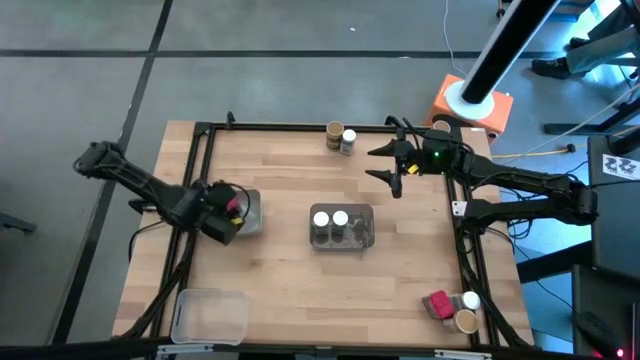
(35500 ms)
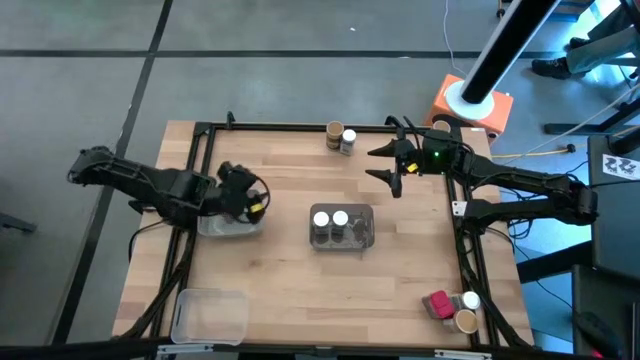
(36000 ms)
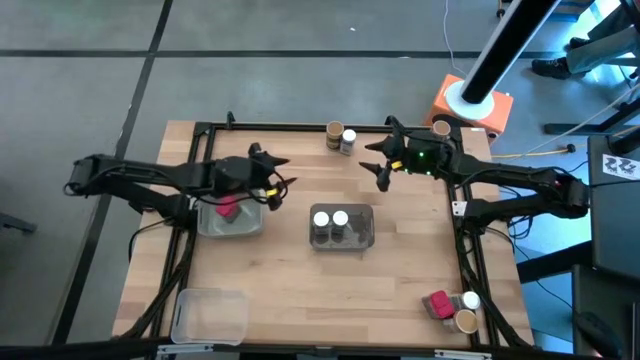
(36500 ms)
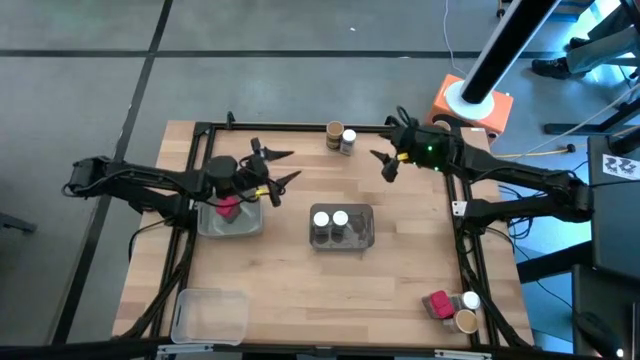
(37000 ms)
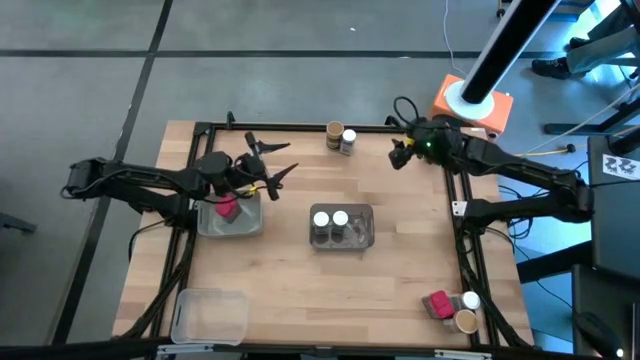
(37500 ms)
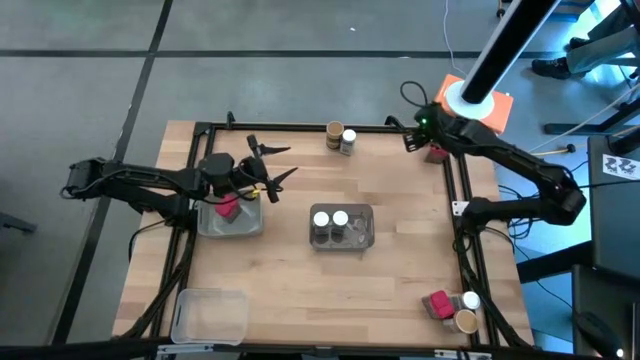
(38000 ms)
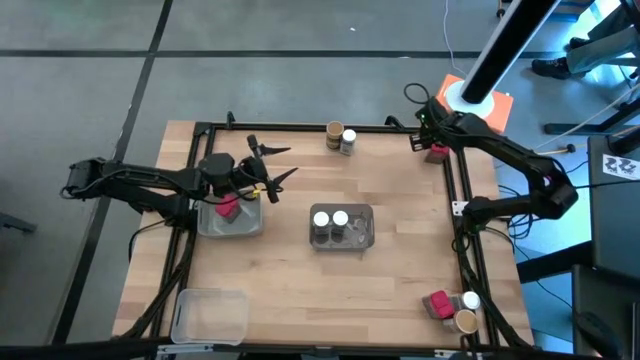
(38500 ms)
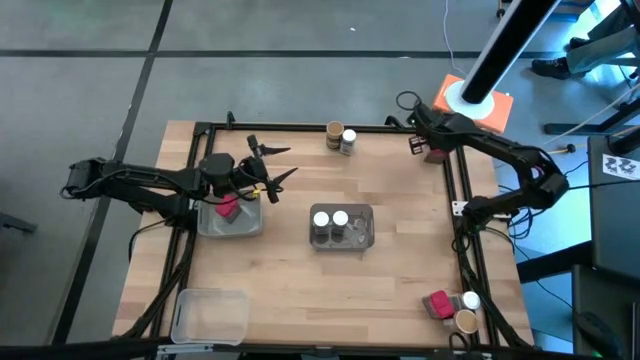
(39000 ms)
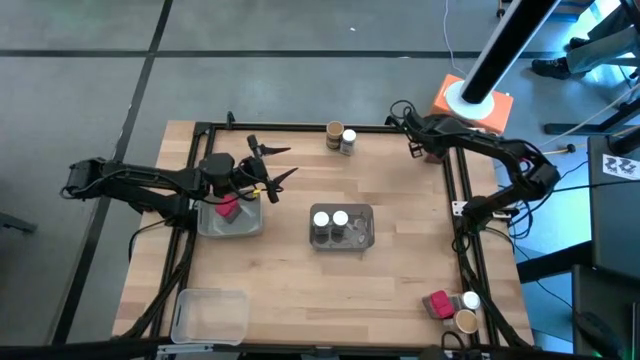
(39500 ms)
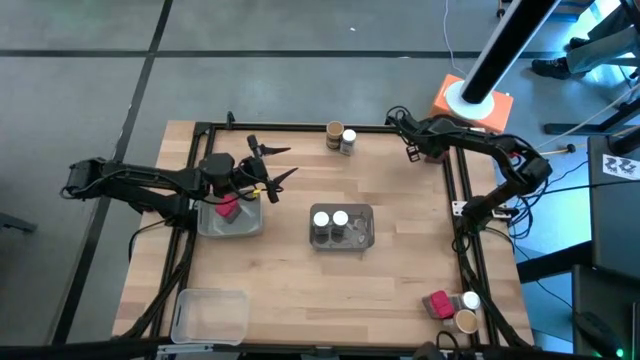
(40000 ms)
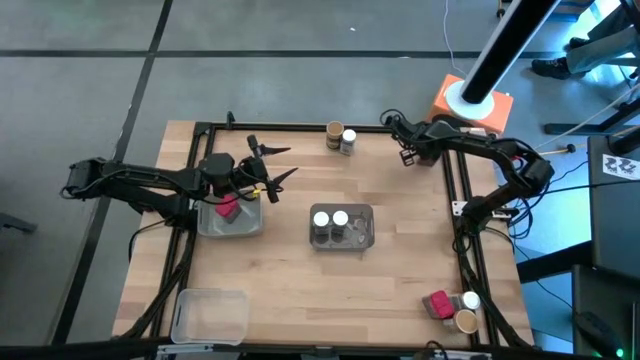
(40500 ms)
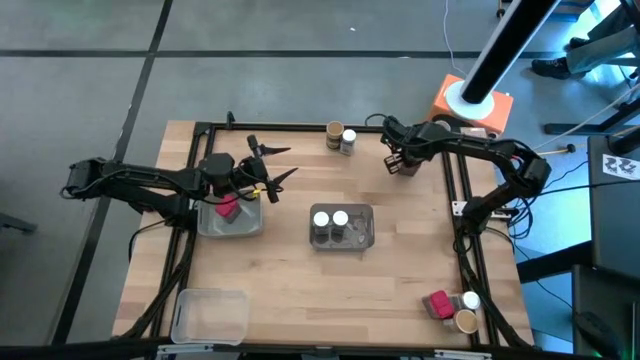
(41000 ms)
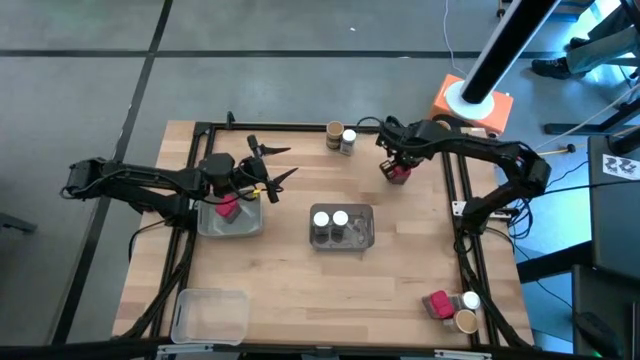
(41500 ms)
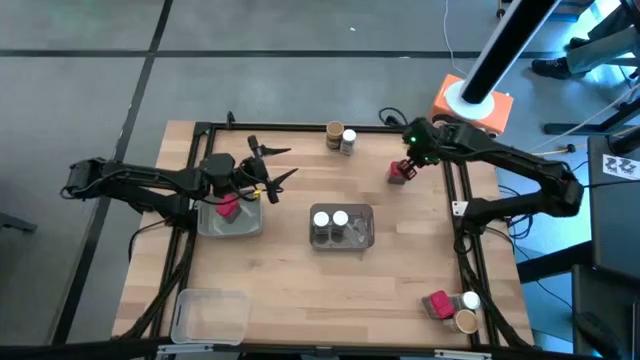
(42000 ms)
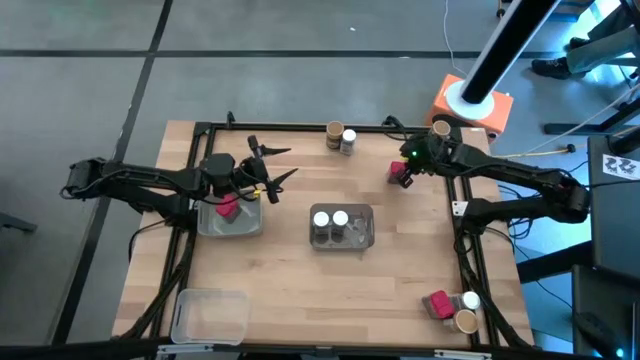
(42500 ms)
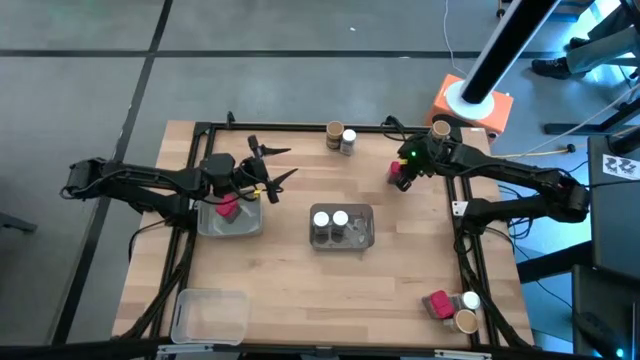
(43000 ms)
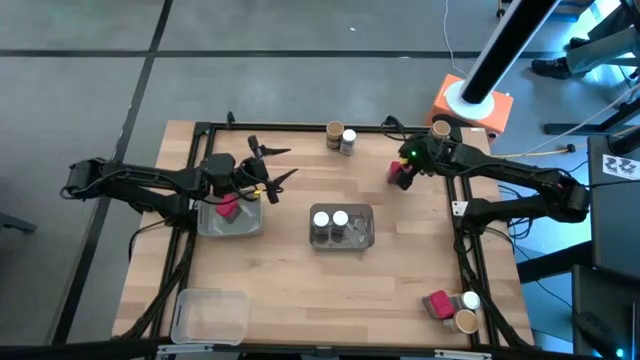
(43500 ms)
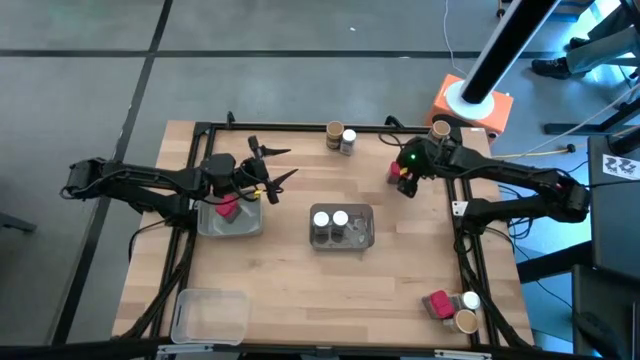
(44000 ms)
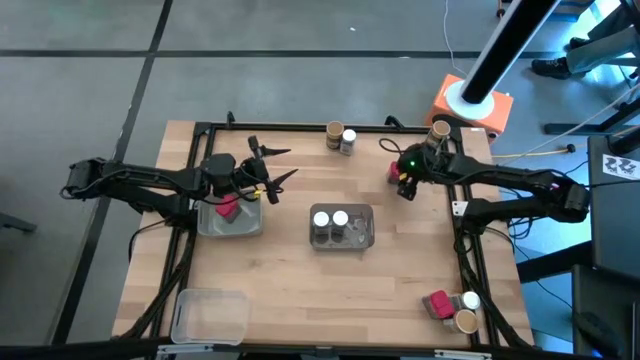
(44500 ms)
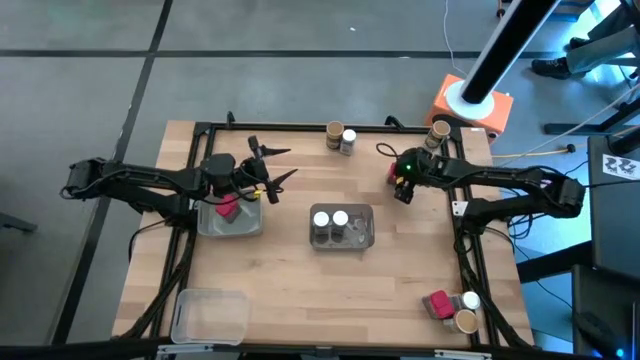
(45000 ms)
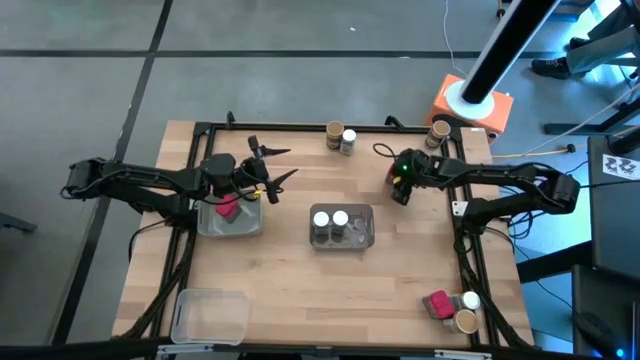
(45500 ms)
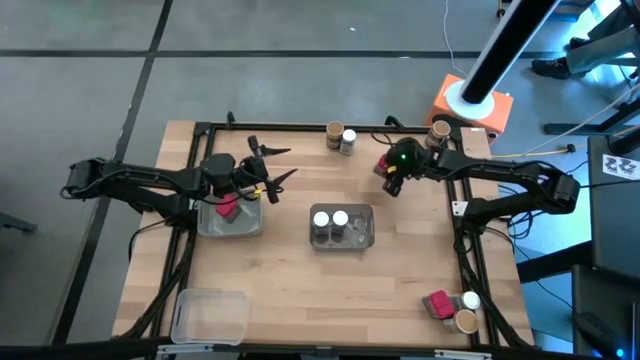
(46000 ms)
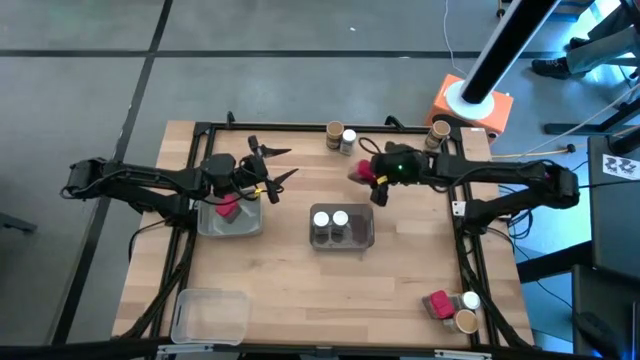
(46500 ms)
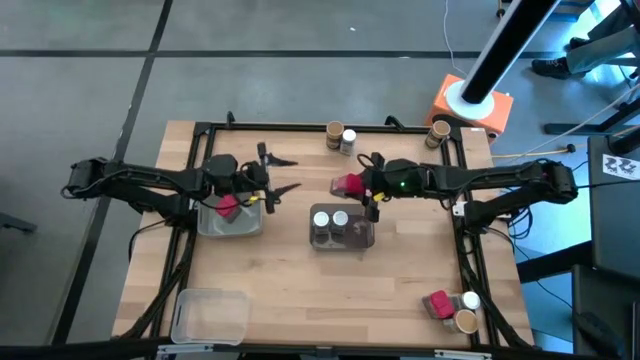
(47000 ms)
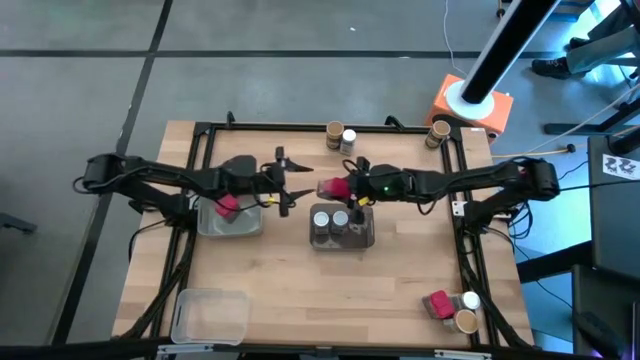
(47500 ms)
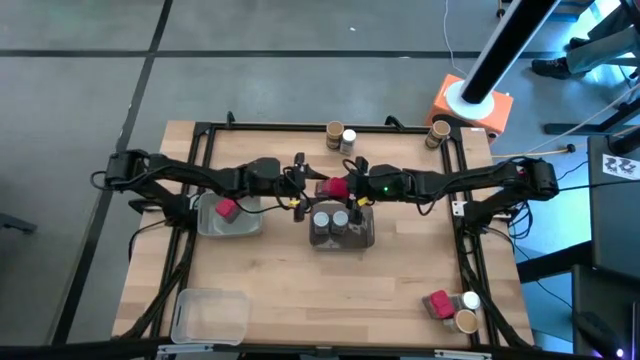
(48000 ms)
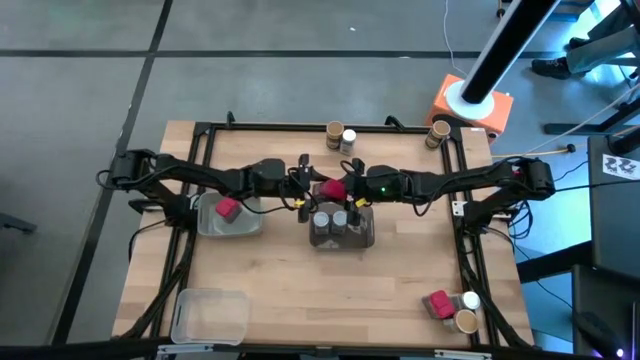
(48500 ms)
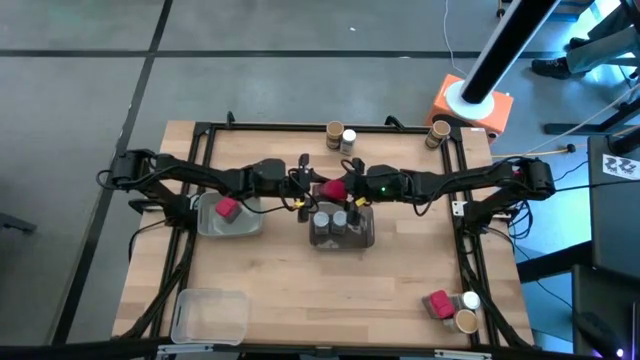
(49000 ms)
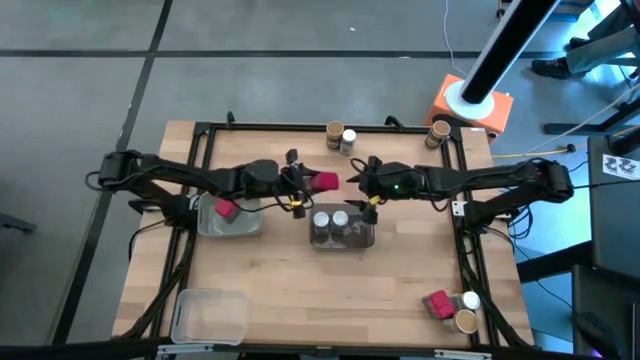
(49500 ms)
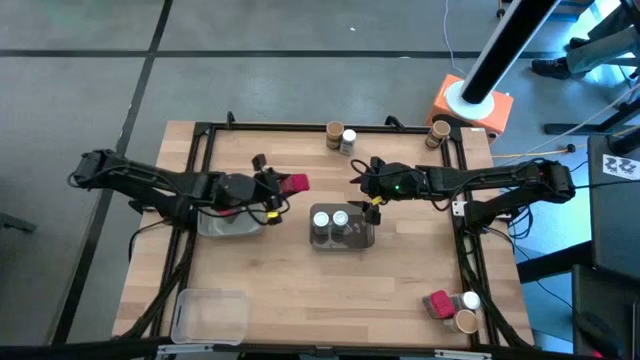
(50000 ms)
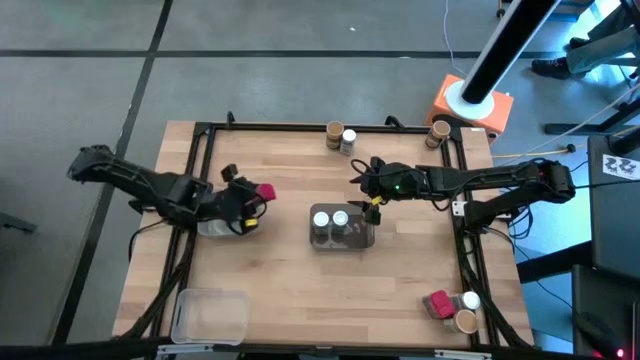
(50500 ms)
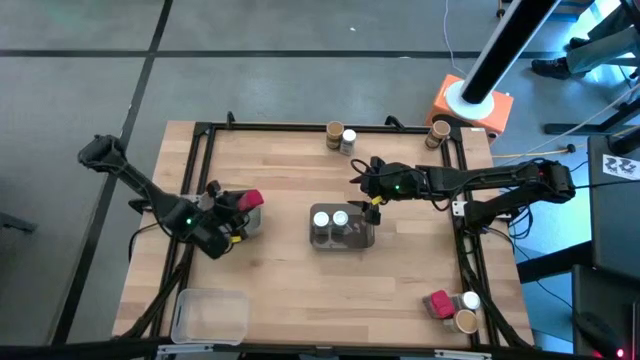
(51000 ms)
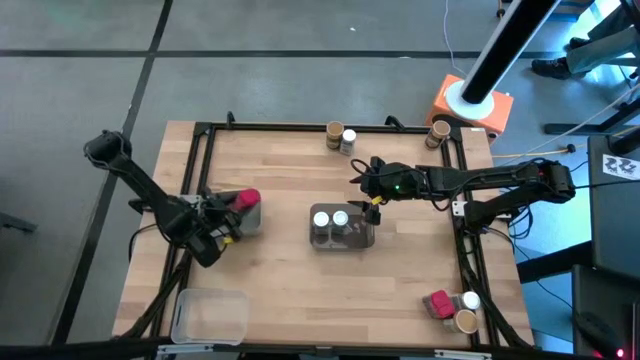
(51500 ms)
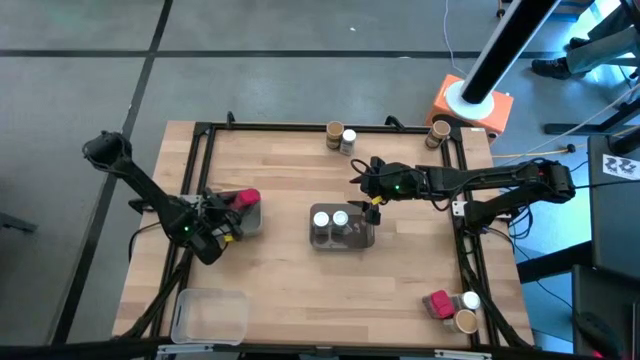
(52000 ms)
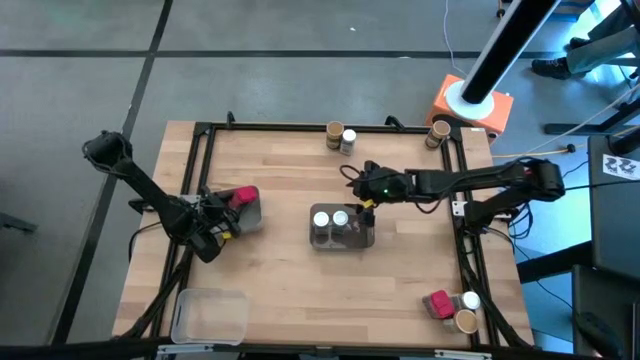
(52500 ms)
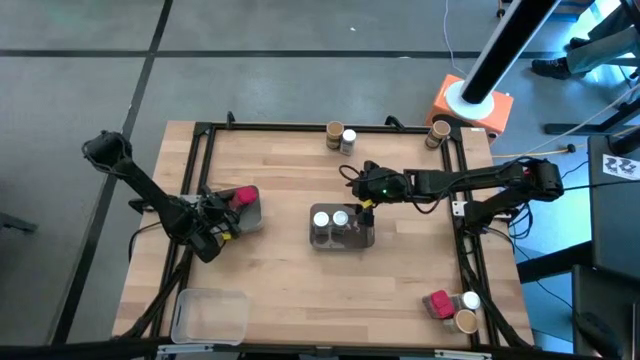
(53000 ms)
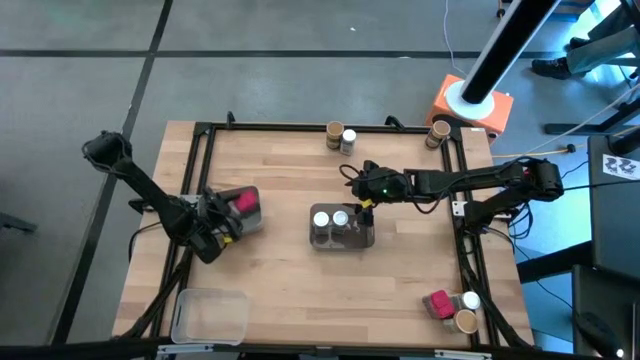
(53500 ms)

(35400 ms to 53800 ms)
Task: Sort spices by type
Put the top red seasoning can into the gray bin

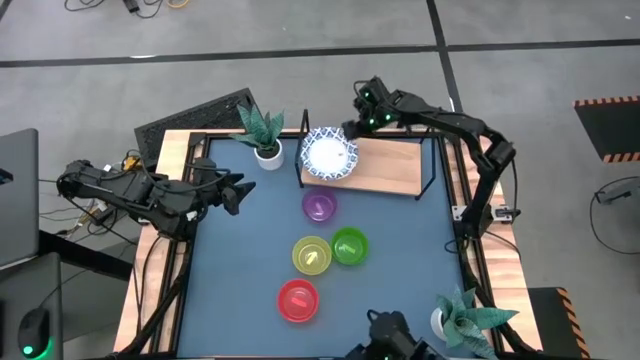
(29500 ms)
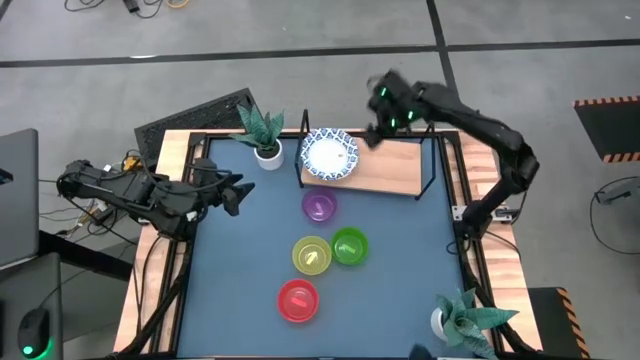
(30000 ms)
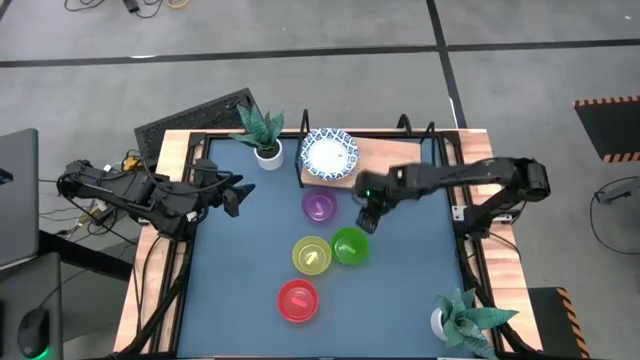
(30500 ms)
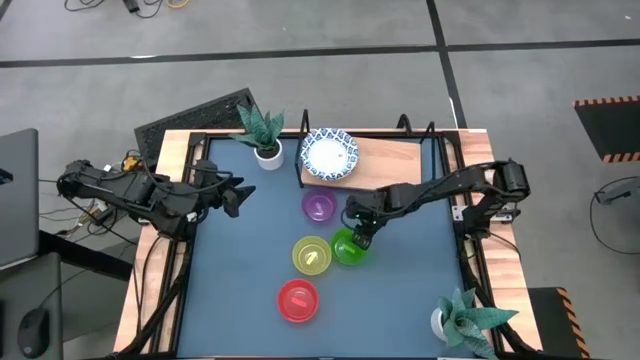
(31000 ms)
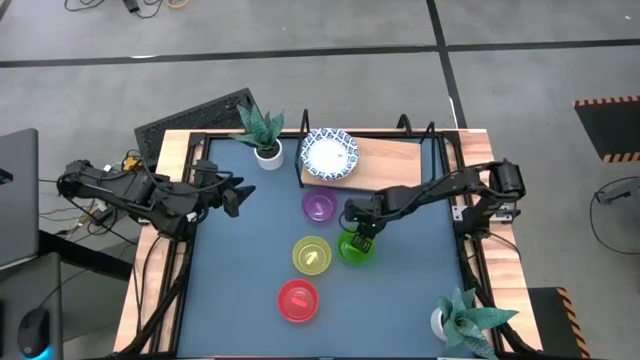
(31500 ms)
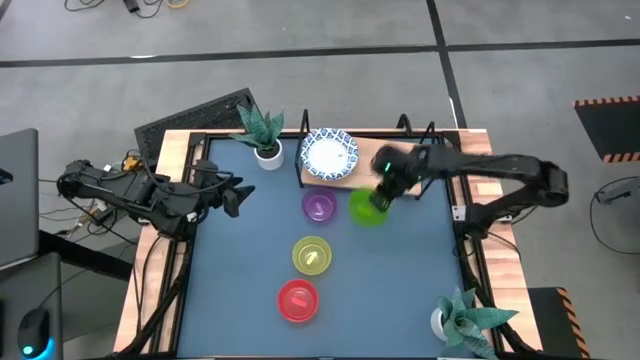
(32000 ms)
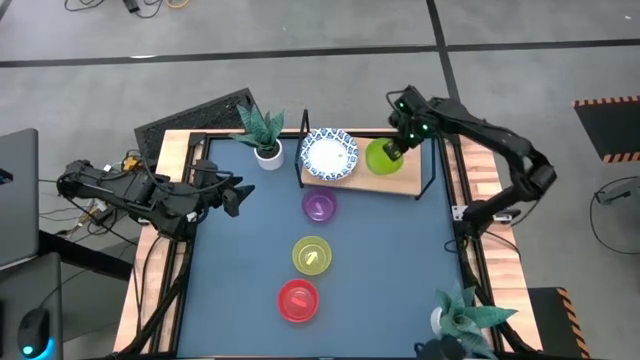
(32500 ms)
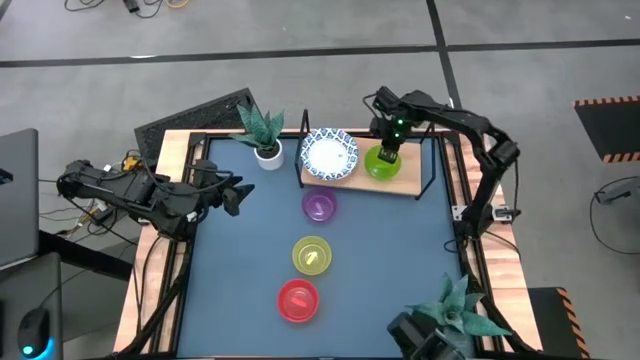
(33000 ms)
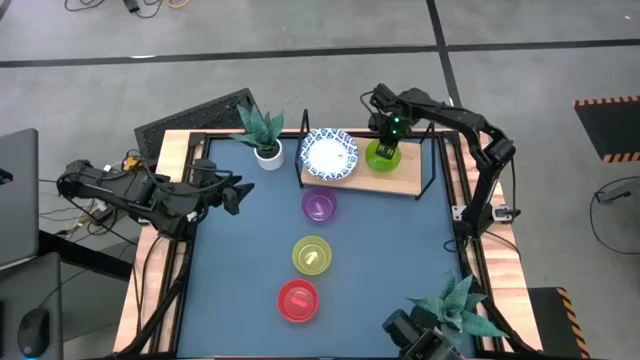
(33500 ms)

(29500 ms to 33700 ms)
Task: Place and stack bowls onto a shelf
Put the green bowl on the shelf
